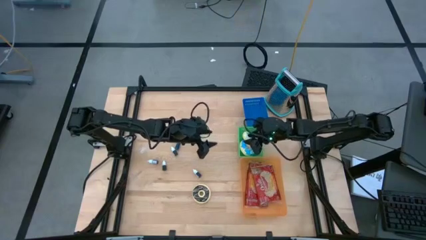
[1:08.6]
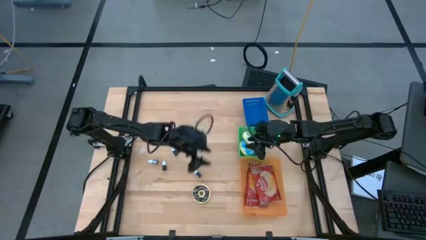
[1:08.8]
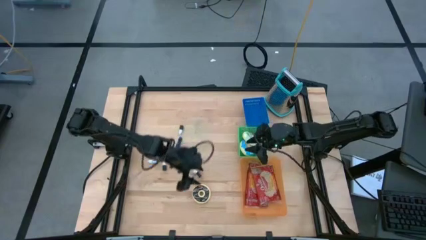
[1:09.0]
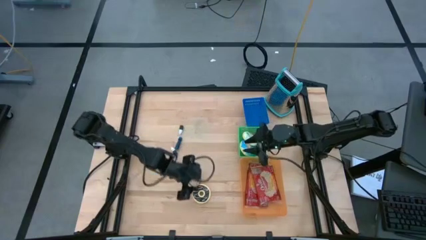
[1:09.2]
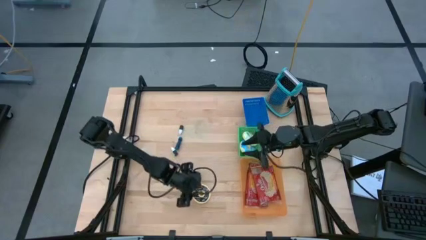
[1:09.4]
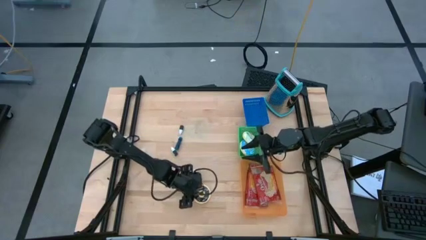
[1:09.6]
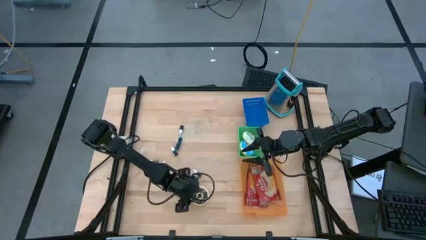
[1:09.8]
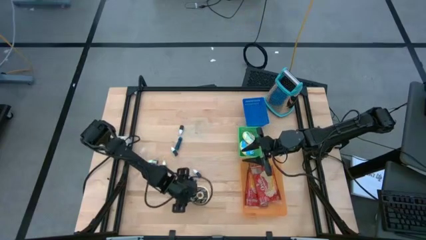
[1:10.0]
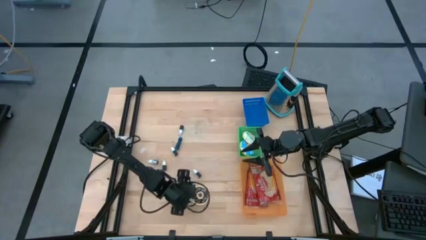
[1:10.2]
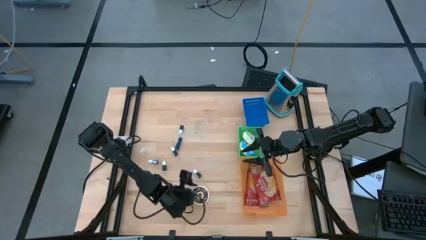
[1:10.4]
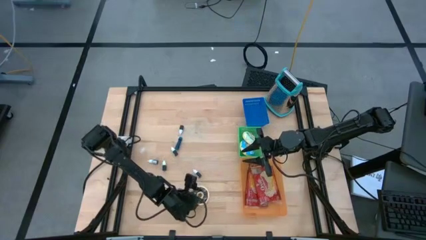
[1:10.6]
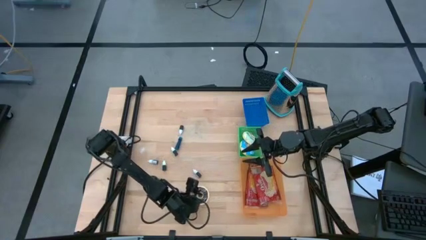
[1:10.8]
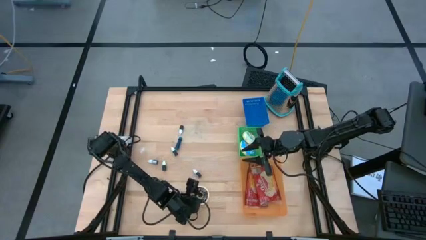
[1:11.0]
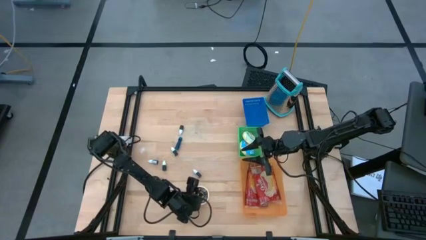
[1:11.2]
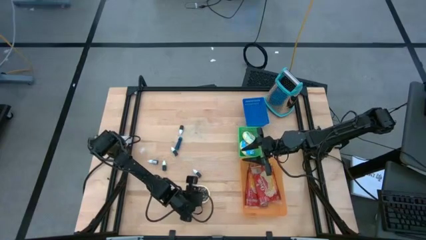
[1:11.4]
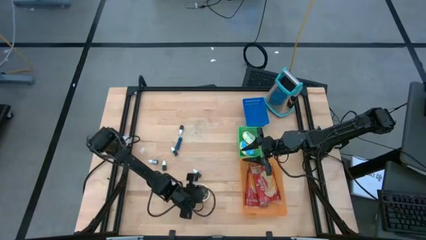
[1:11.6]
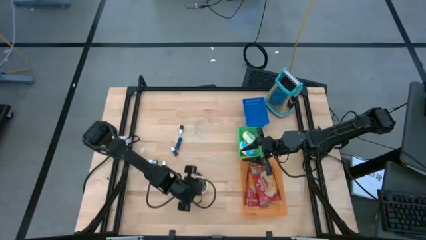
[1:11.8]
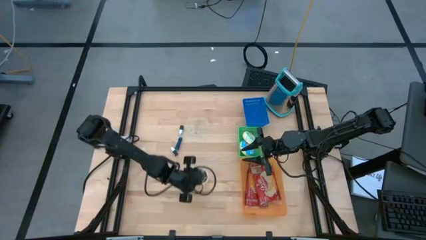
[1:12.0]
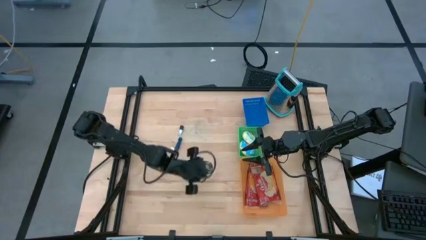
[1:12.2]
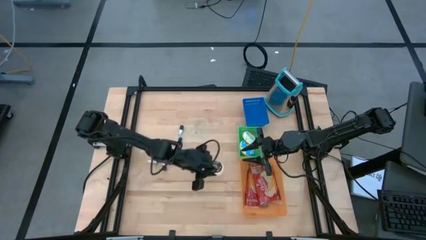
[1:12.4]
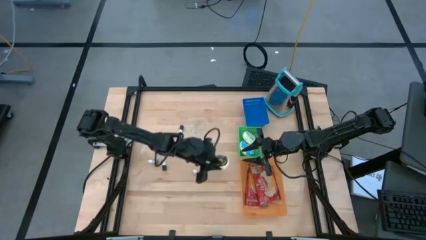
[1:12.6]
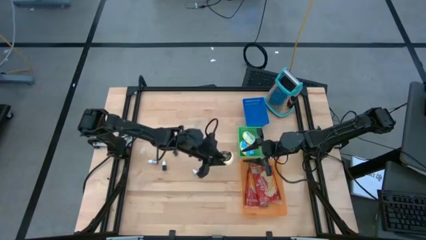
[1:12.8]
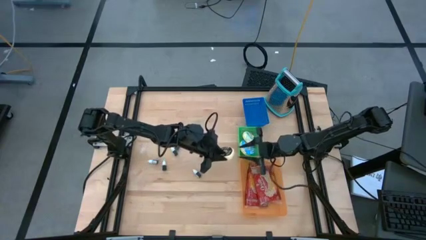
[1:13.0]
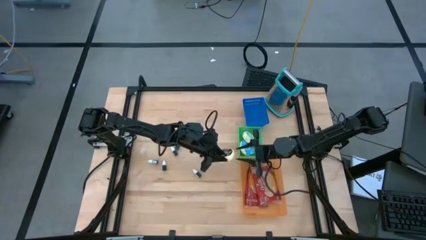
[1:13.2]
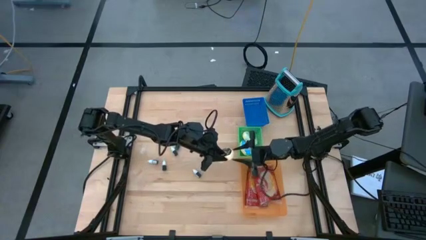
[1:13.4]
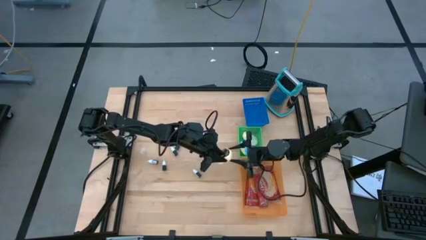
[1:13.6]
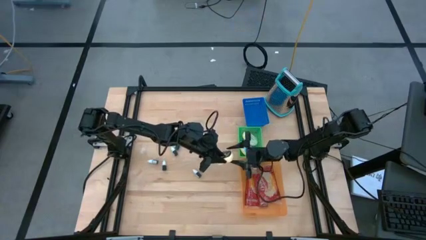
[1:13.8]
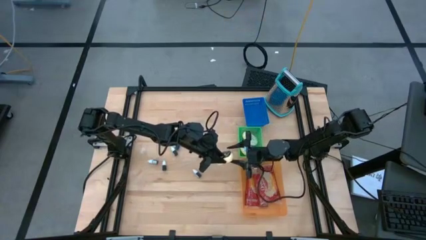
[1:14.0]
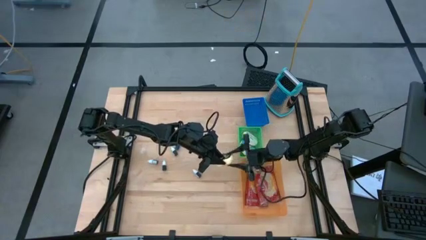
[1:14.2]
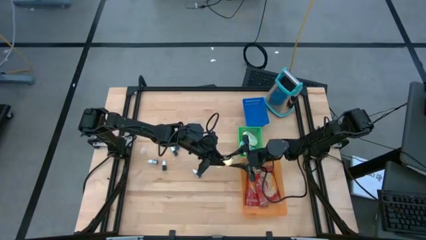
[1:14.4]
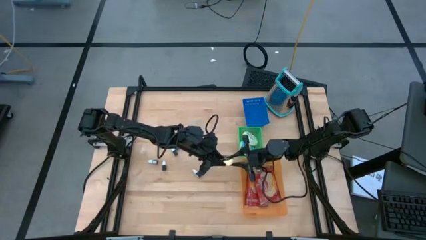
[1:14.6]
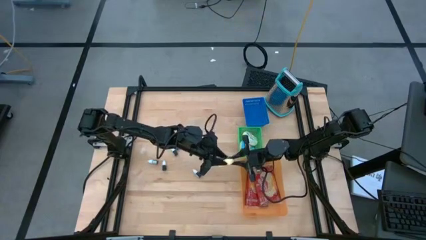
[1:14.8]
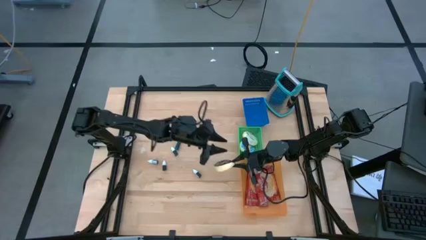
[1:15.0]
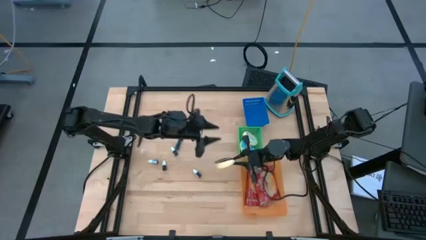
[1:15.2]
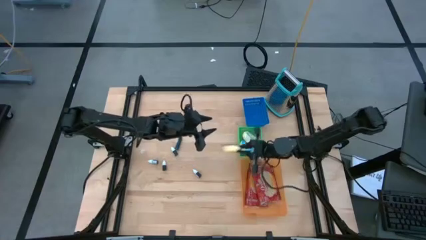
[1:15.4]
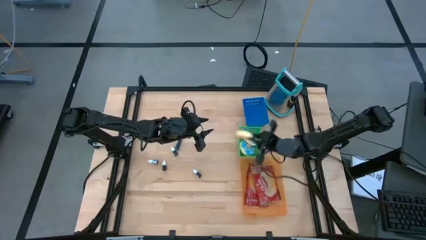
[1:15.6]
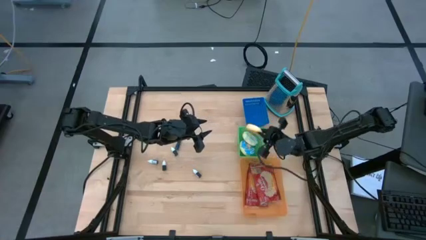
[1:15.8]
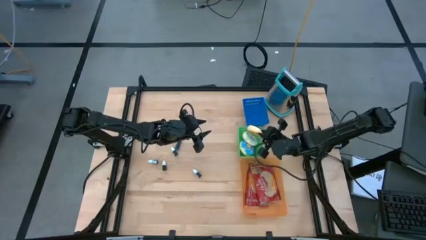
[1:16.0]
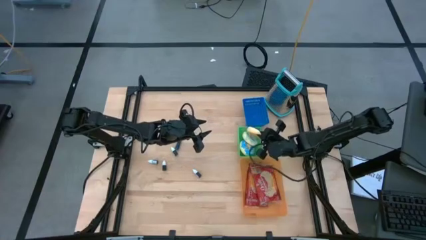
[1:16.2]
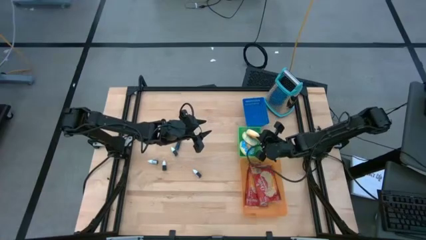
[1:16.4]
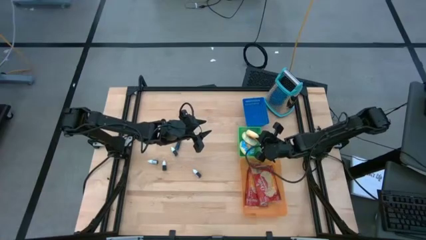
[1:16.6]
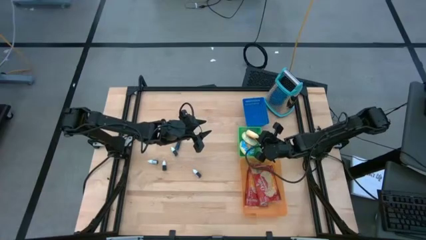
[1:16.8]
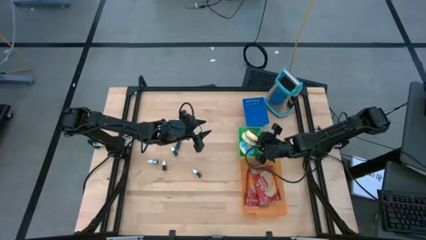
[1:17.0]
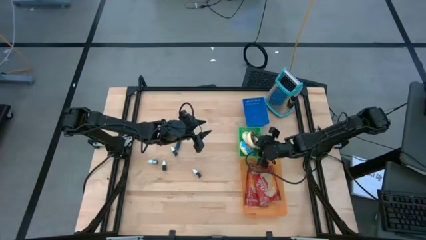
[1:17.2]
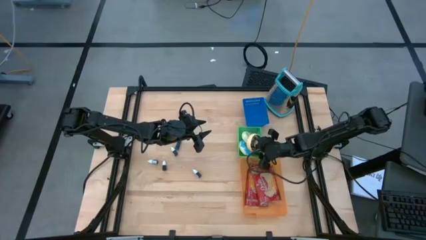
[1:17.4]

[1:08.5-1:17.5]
Put the black donut into the green bin

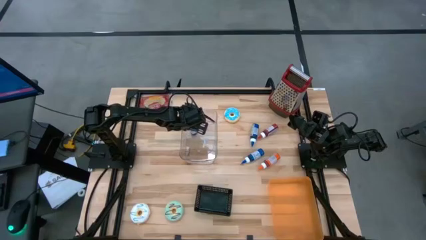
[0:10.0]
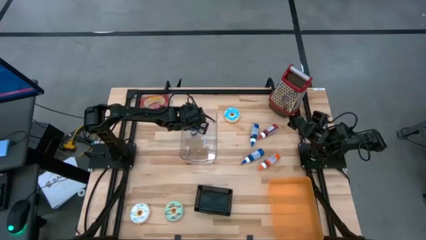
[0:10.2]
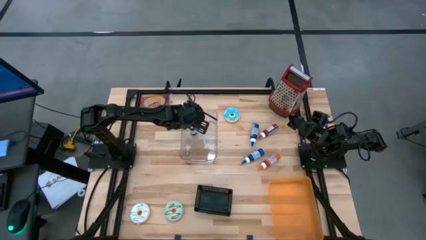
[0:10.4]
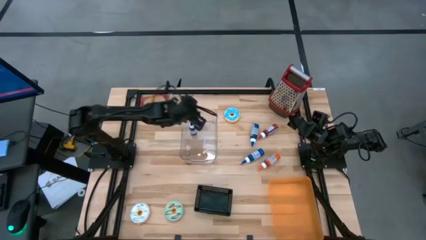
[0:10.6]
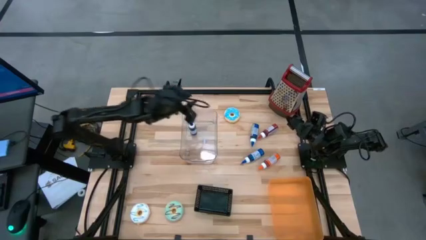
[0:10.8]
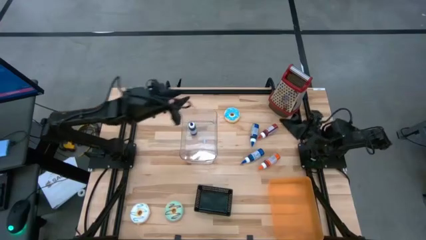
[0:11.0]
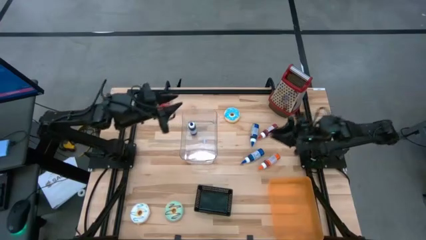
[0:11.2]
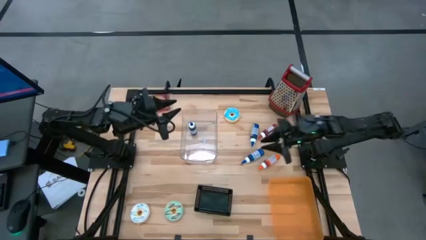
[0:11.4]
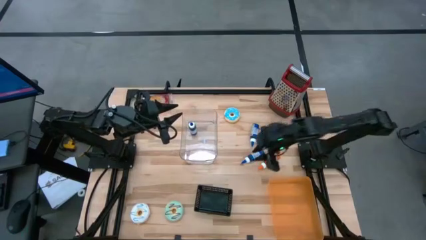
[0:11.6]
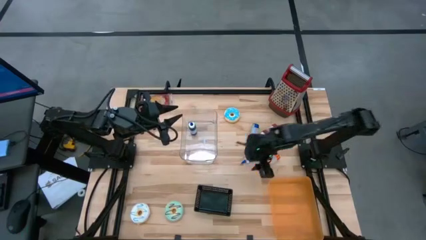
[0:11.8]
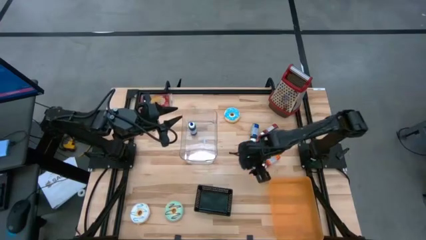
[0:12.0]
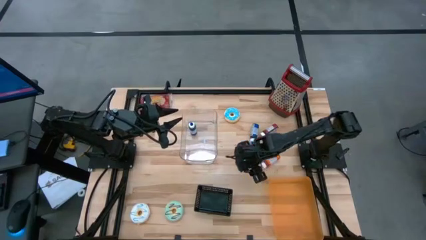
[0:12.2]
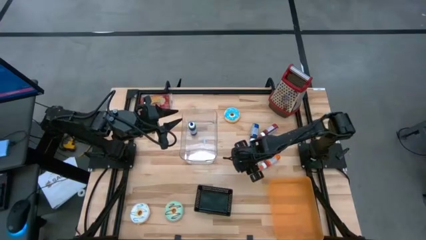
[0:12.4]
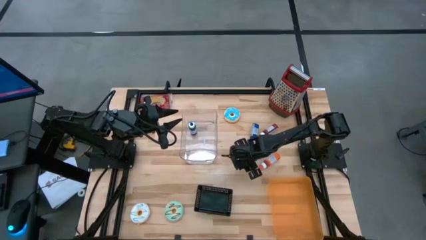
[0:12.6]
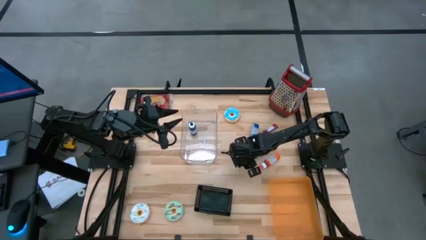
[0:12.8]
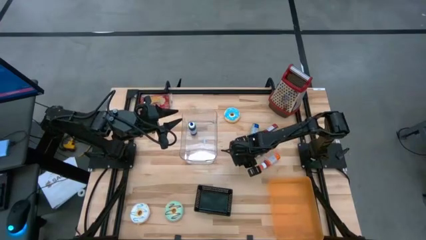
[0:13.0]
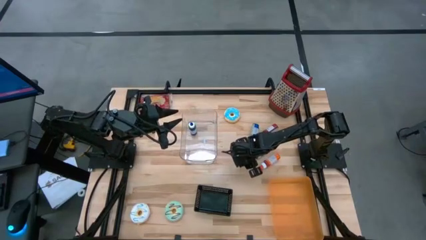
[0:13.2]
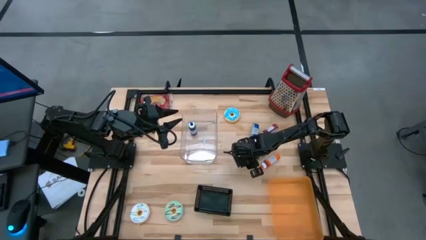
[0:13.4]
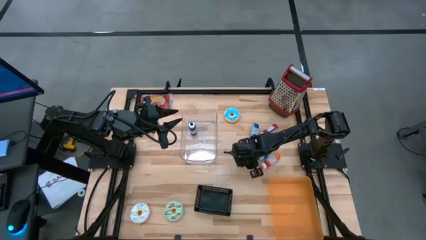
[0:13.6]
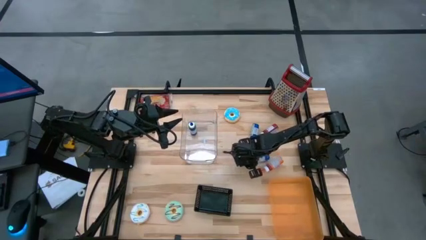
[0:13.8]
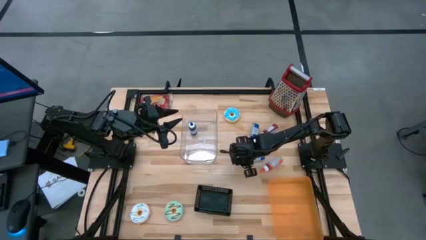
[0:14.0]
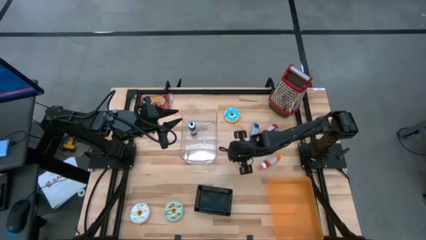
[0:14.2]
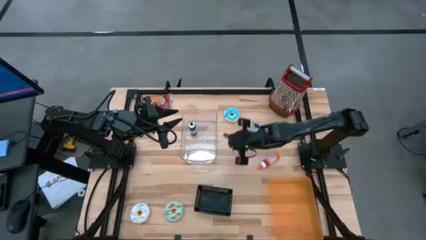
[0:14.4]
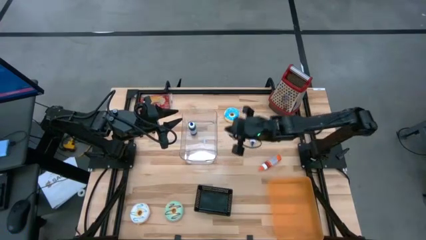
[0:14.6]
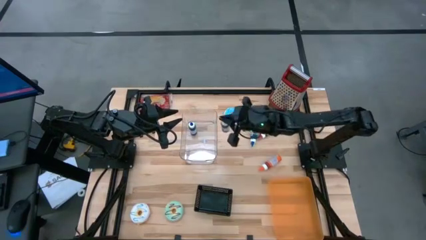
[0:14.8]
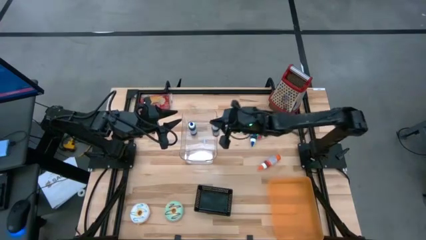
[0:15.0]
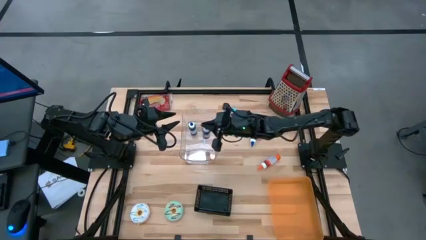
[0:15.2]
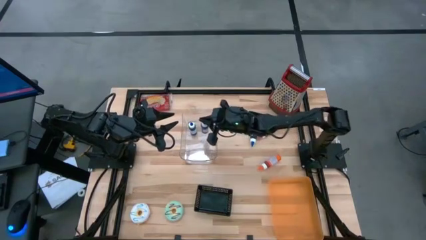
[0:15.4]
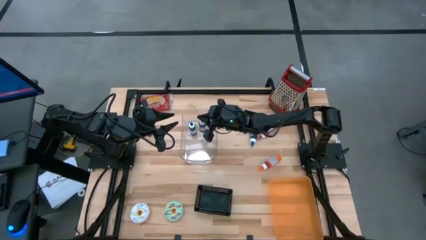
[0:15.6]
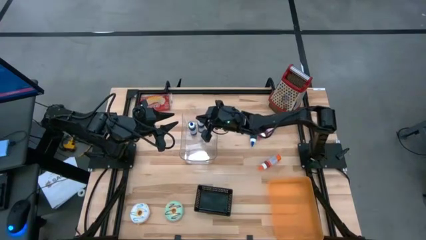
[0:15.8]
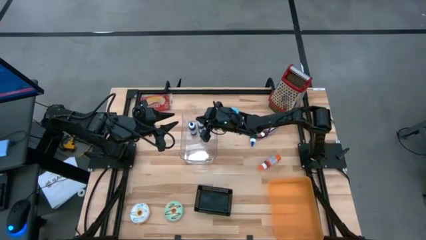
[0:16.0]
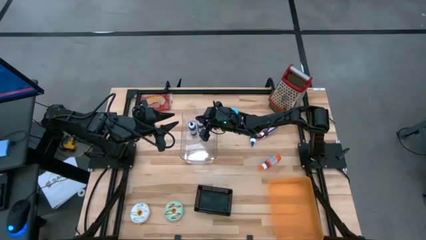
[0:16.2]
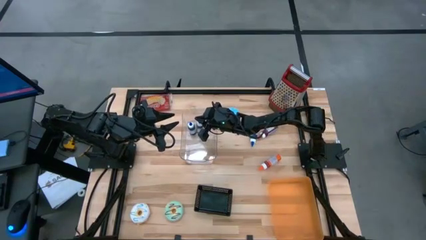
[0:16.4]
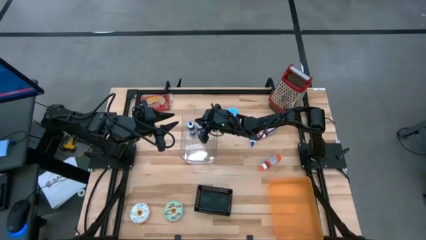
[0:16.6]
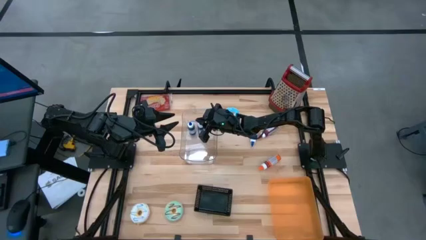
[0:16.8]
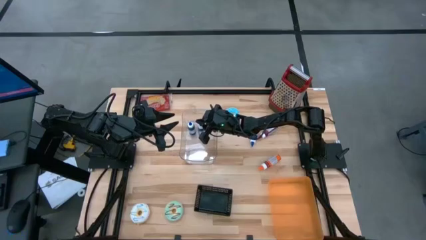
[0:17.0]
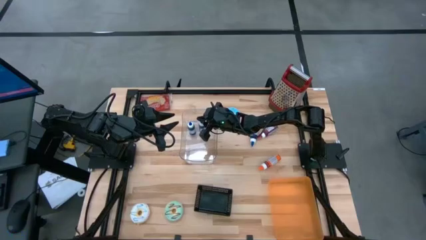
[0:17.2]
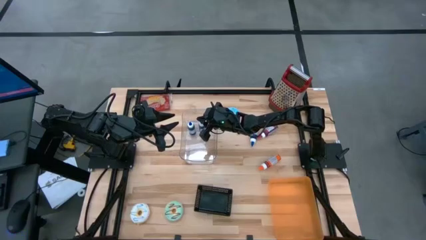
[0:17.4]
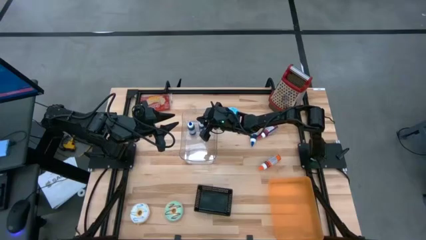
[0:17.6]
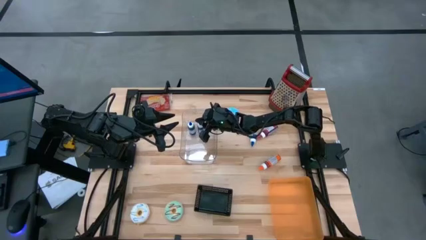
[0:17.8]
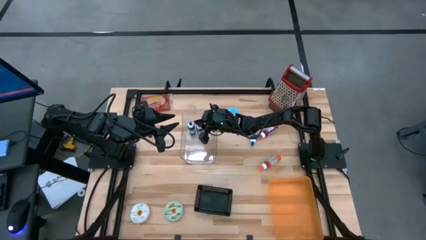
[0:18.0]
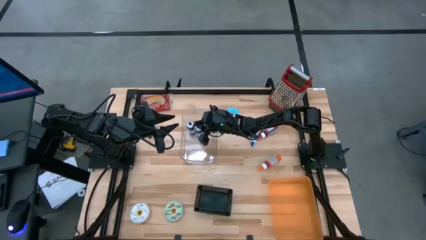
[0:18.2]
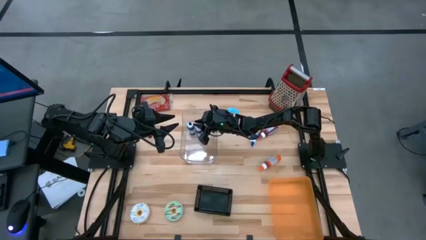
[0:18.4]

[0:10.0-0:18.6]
Put the bottom blue food coloring bottle into the transparent bin
